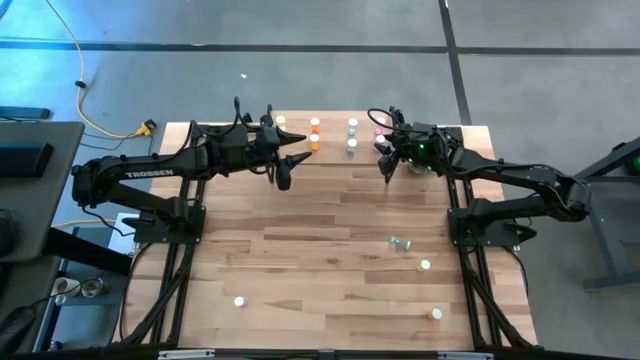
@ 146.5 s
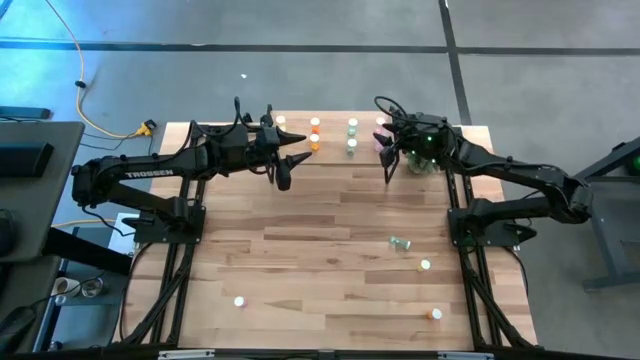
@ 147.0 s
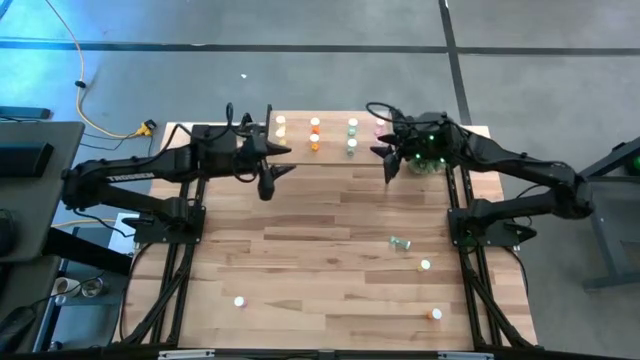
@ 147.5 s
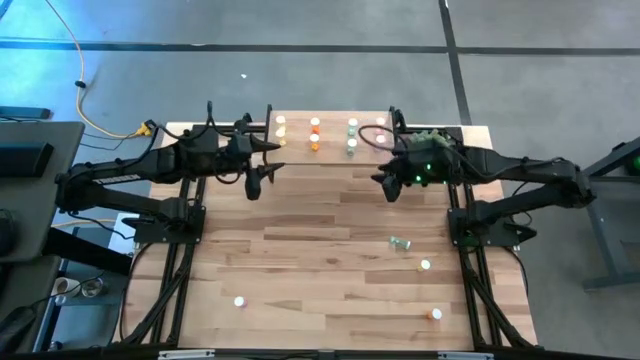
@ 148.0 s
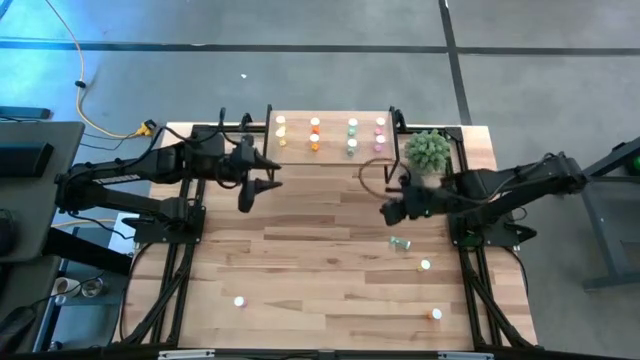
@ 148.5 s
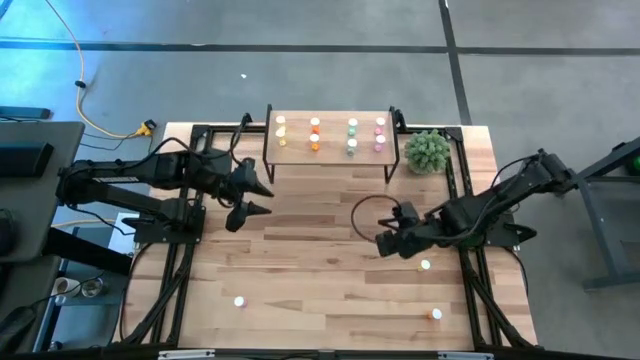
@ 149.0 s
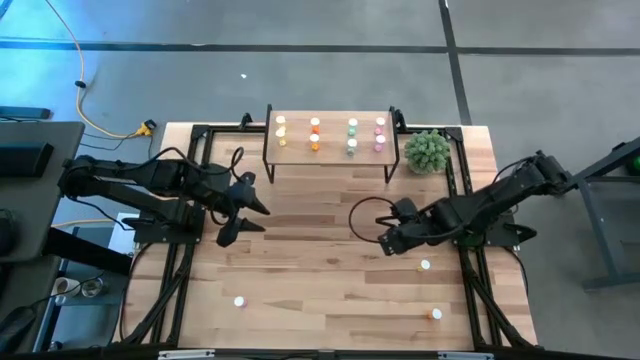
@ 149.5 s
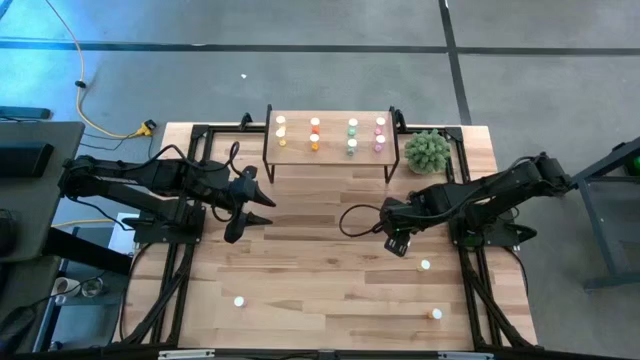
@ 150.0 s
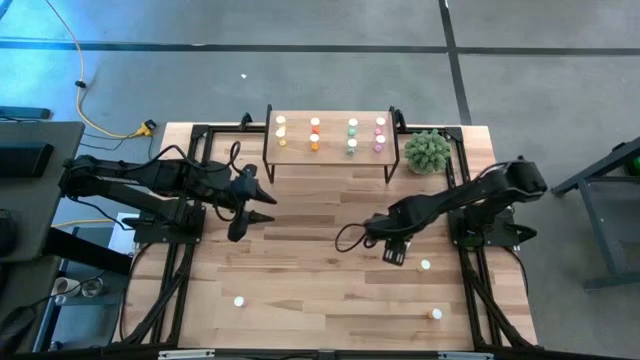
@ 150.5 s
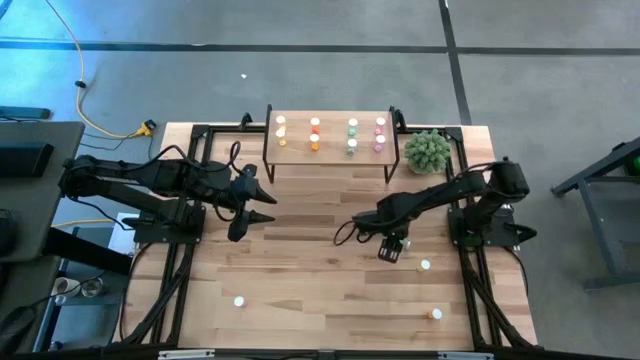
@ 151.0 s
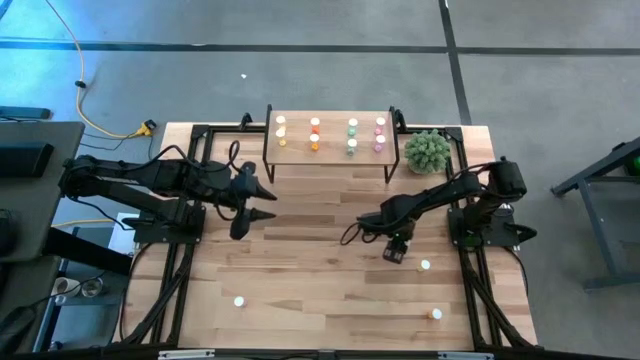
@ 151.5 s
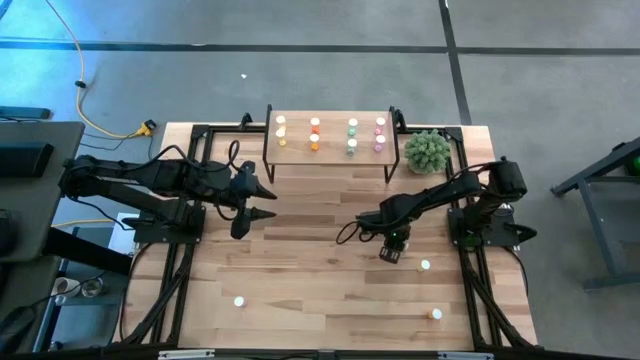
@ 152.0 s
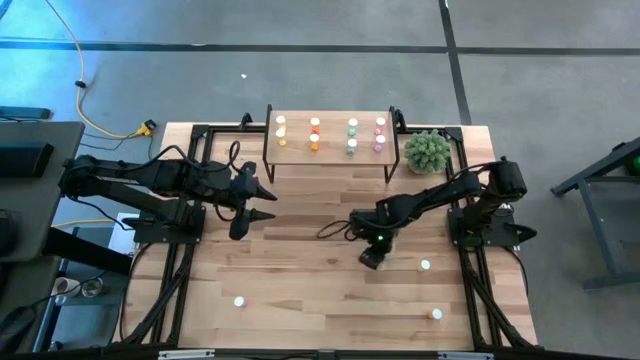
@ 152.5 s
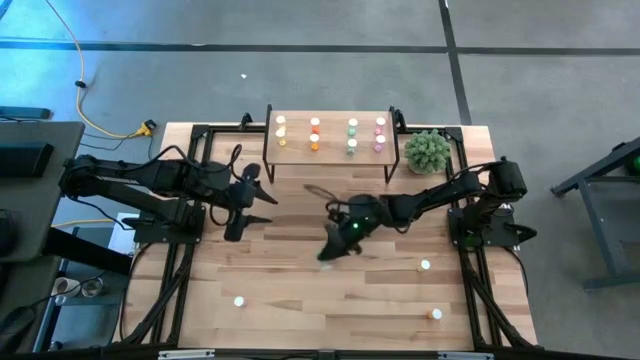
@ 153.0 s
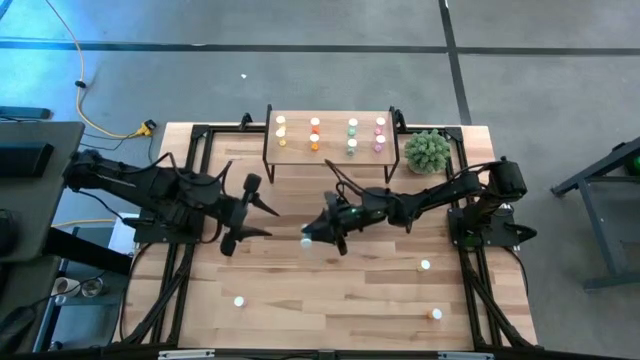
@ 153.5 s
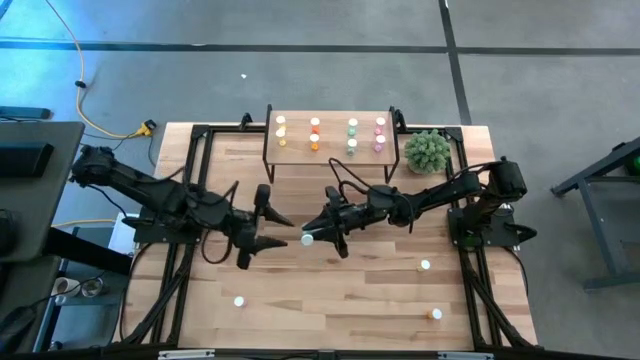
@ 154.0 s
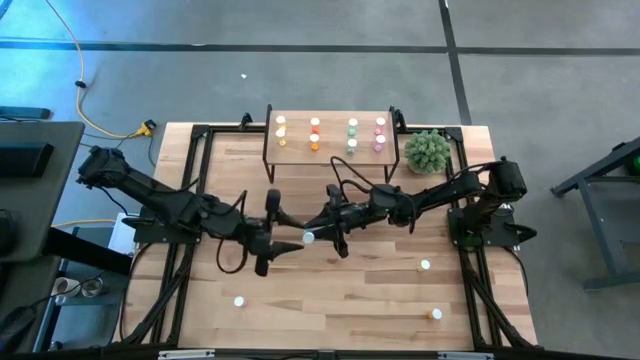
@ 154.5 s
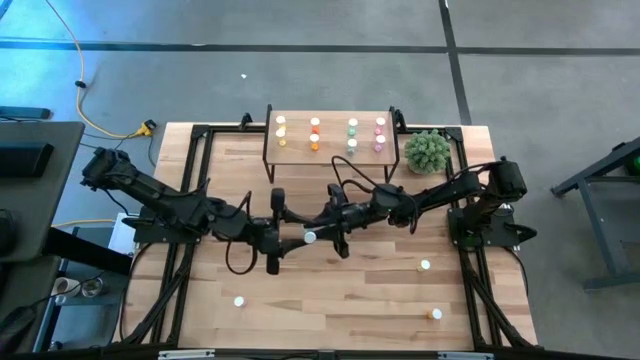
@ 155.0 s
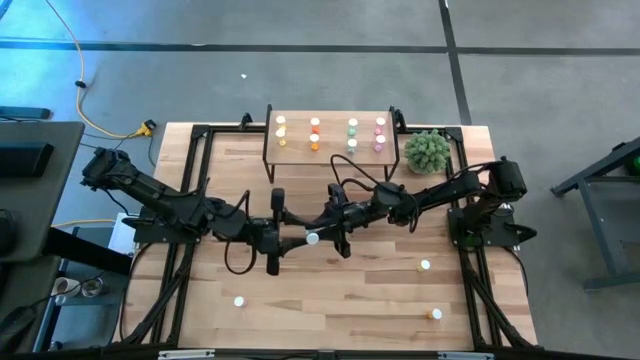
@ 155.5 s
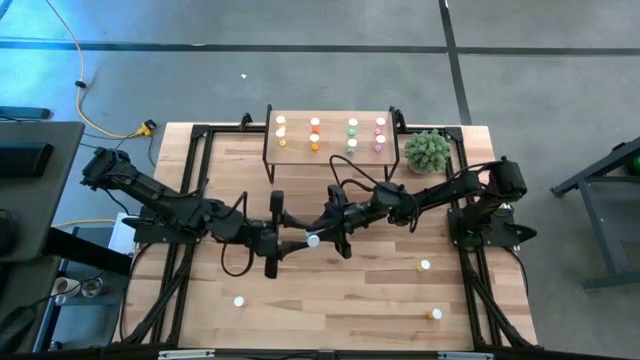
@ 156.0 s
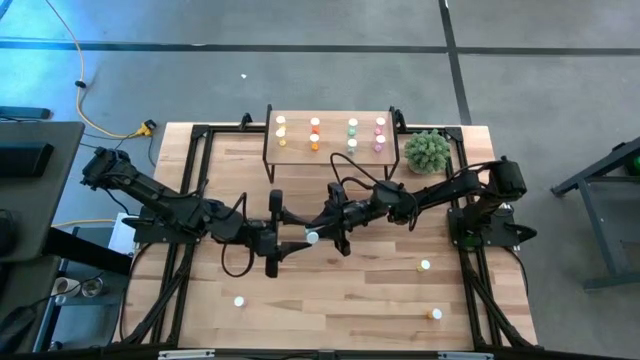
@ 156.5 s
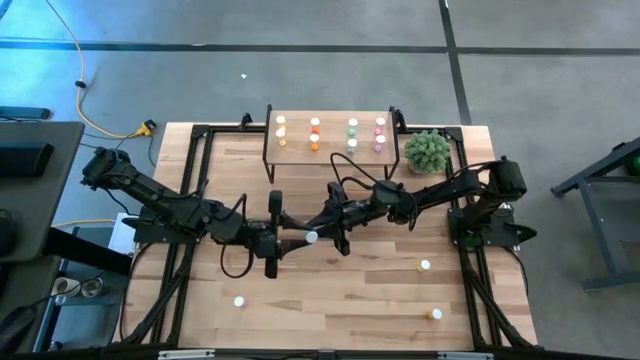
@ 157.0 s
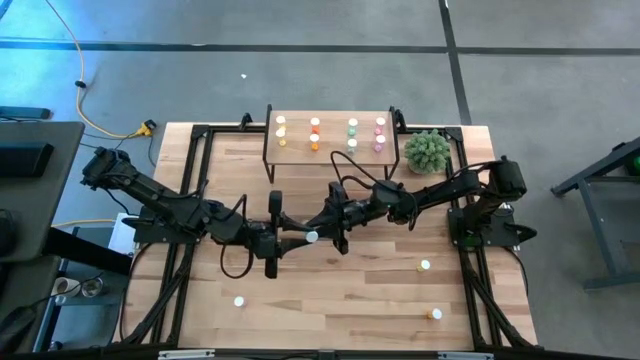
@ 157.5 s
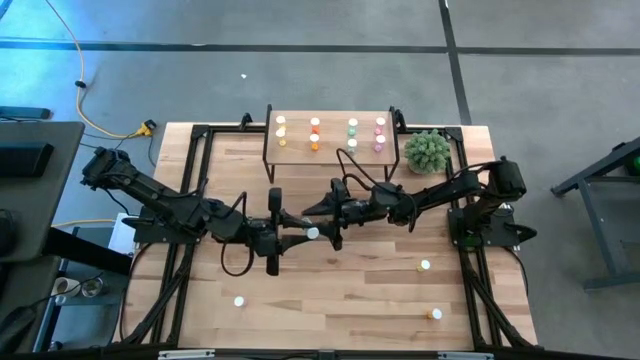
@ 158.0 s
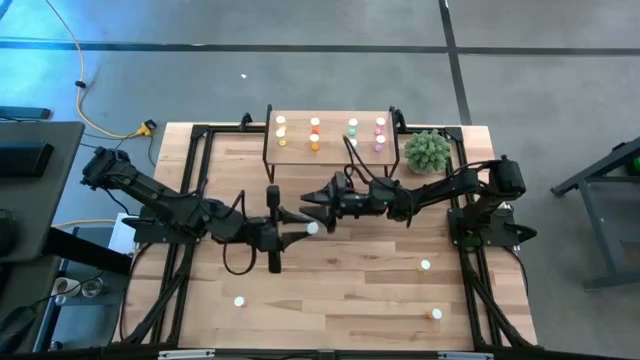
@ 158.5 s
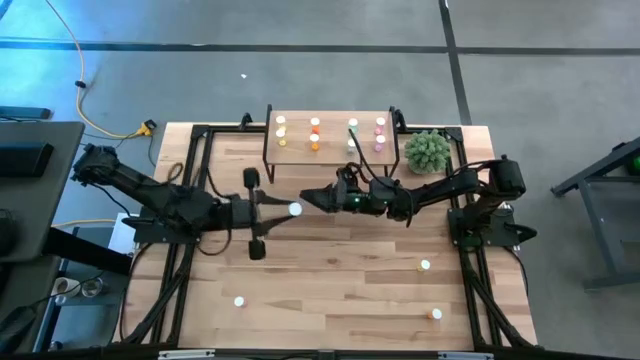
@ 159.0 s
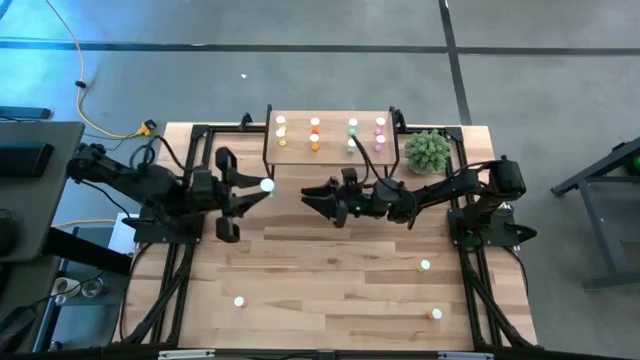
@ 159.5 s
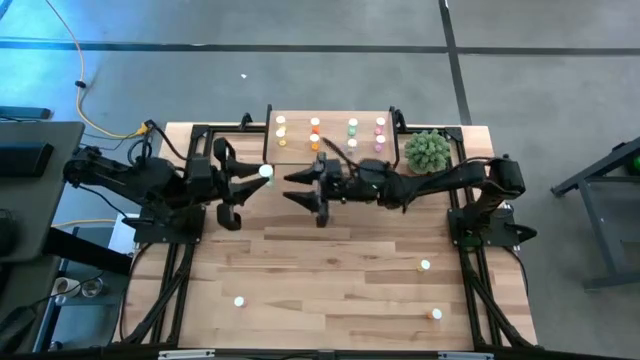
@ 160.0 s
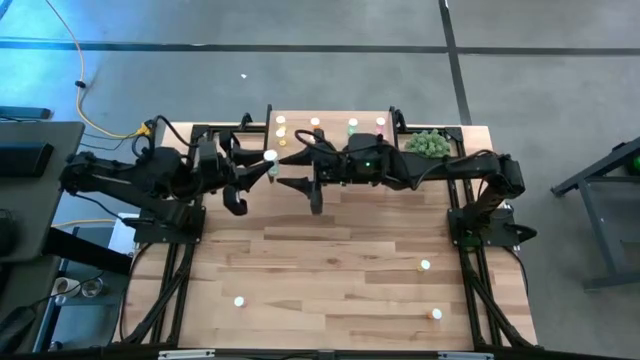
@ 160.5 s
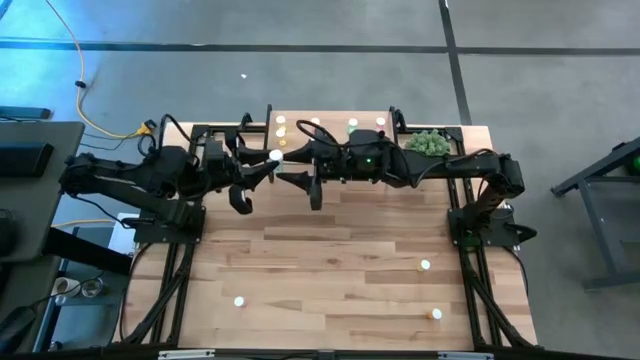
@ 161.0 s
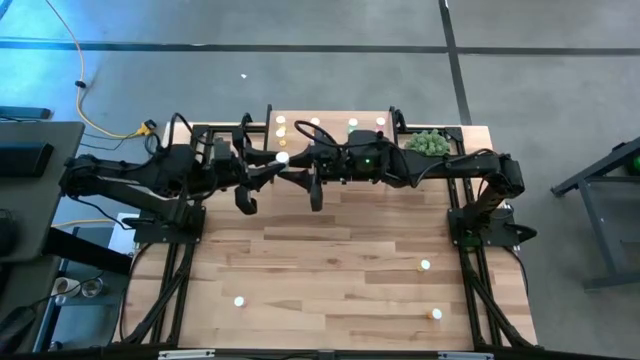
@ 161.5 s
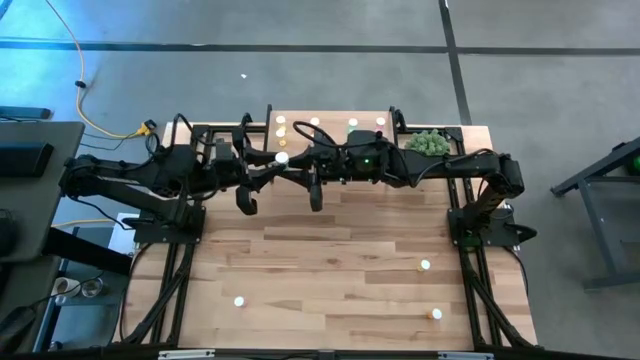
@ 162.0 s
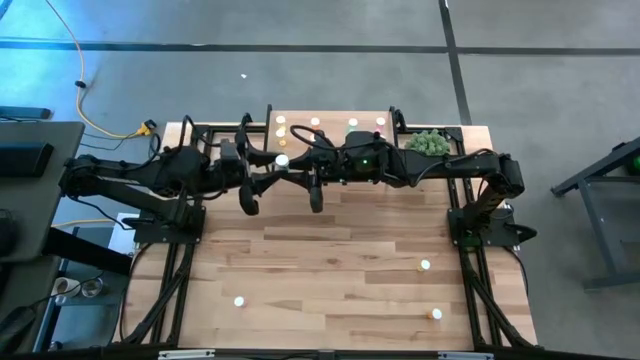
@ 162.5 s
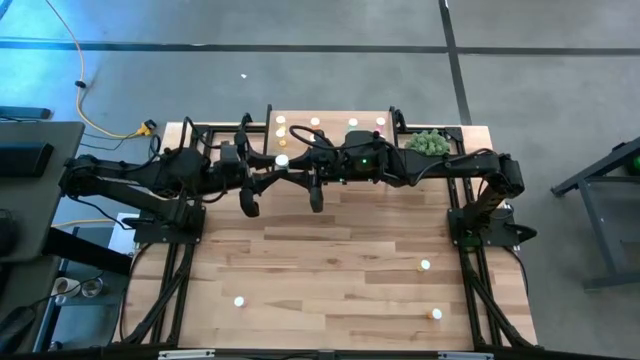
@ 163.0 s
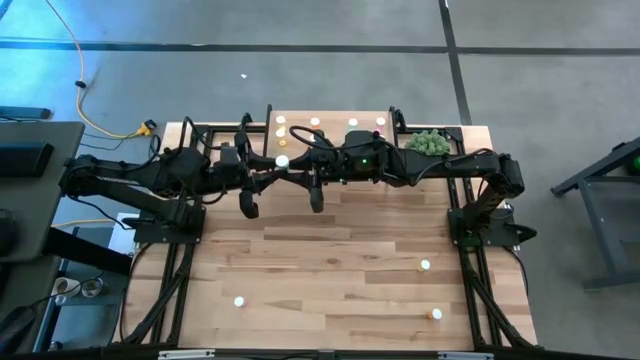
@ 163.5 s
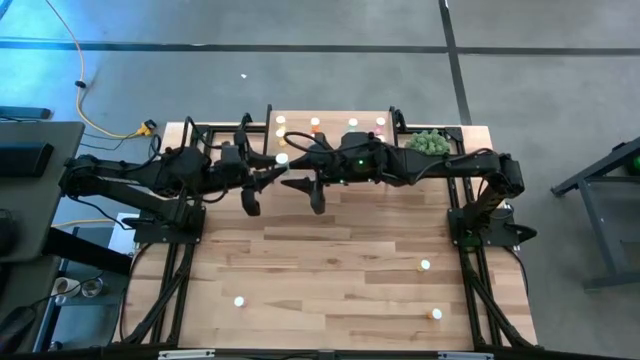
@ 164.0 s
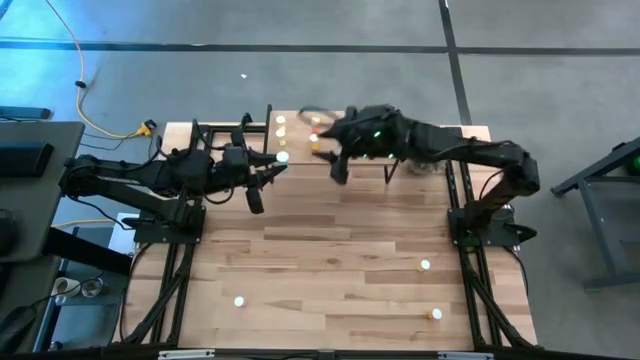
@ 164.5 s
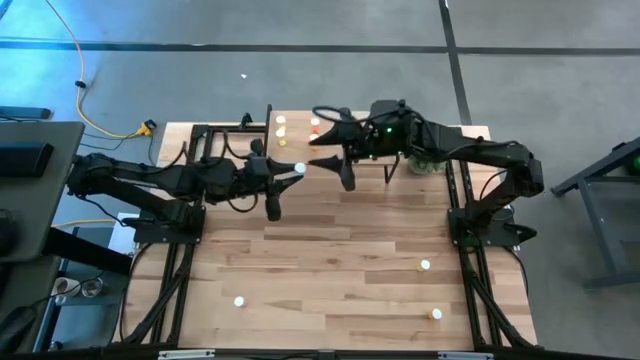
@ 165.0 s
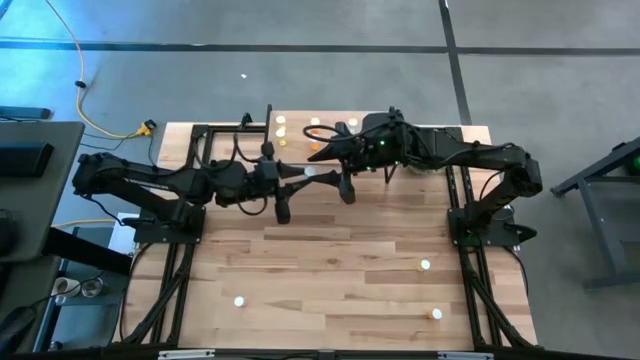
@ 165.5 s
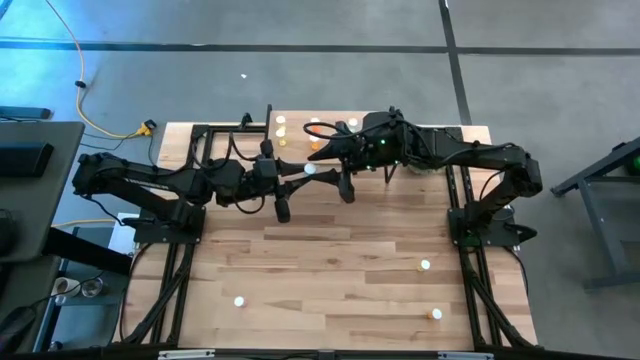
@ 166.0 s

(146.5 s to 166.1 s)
Task: Pick and place medicine bottles onto shelf by color
Put the blue pill bottle on the shelf aligned with the other blue pill bottles

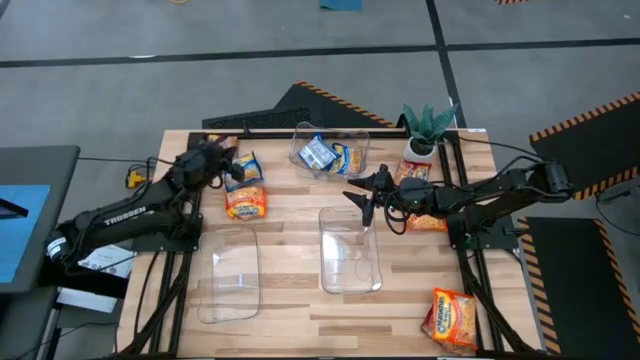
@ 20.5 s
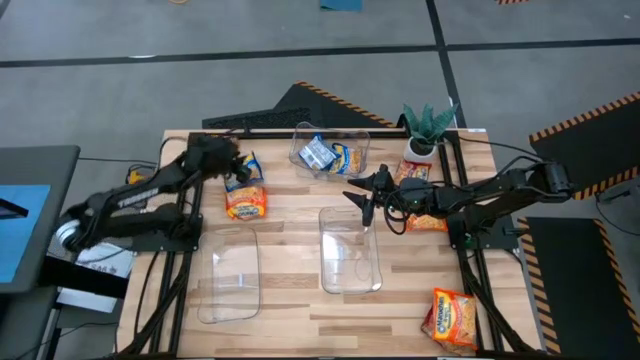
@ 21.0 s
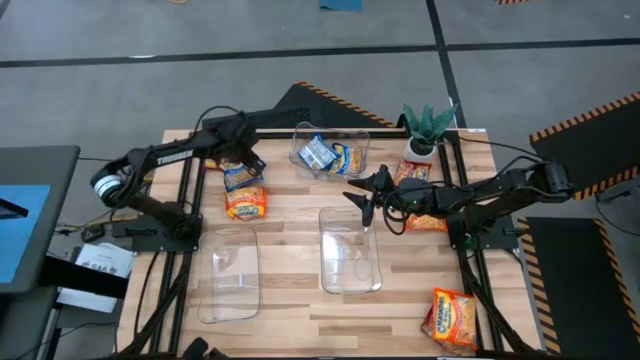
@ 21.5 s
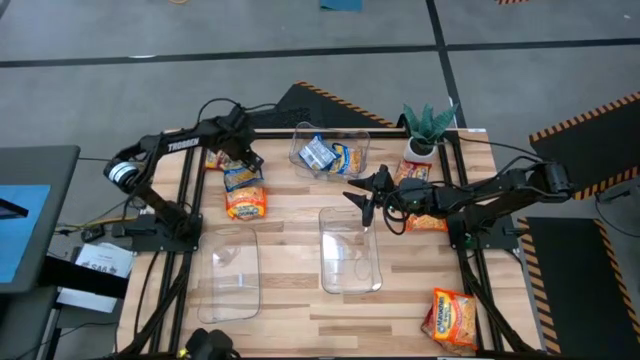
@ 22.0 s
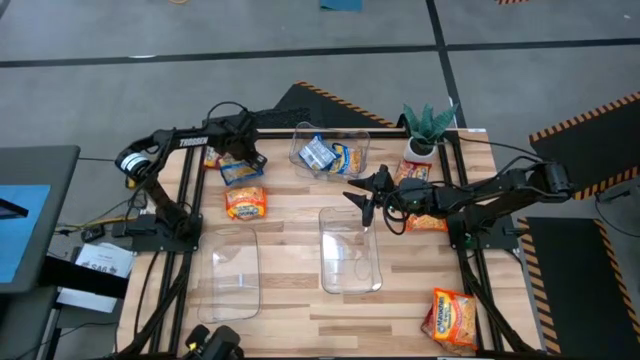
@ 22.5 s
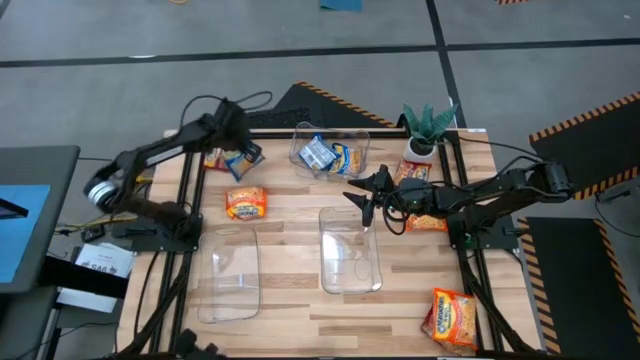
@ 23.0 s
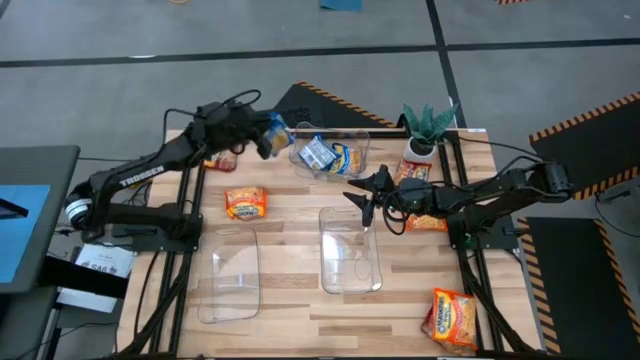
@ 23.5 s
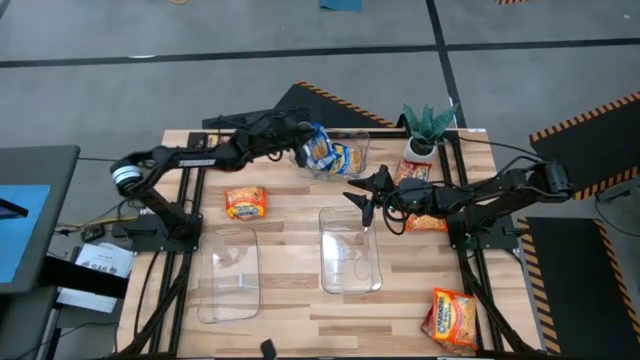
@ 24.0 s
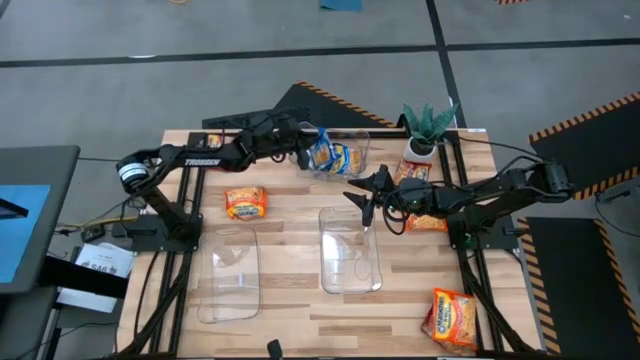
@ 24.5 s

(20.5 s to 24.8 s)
Task: Sort Maruchan noodles
Put the blue noodle pack into the top transparent bin
